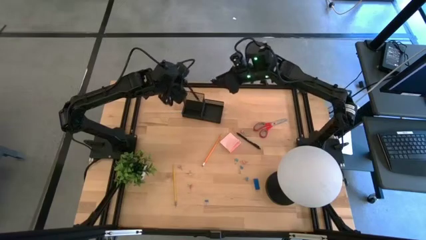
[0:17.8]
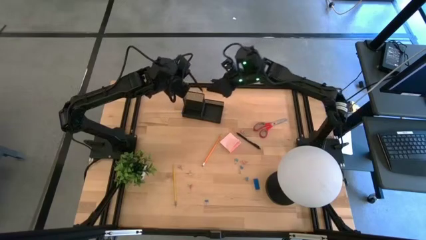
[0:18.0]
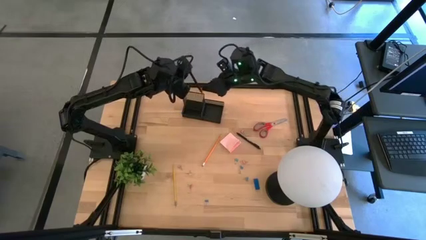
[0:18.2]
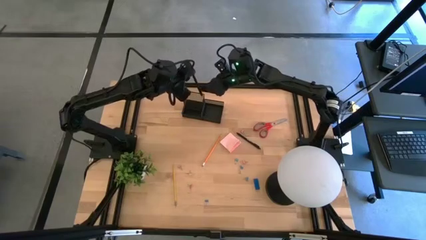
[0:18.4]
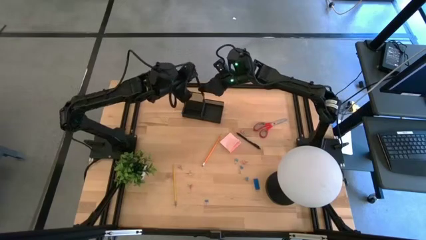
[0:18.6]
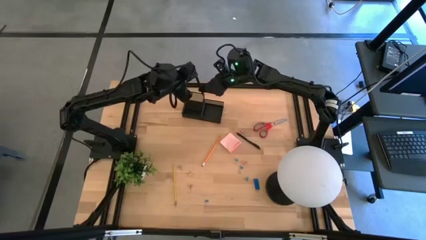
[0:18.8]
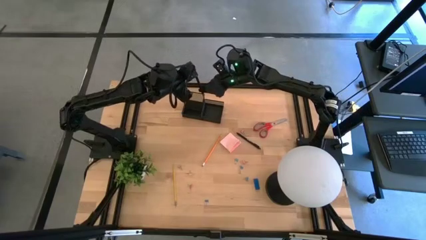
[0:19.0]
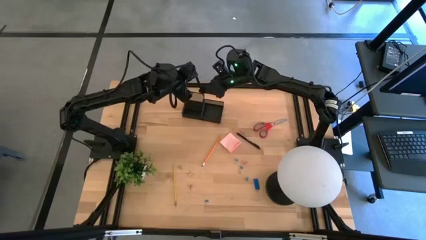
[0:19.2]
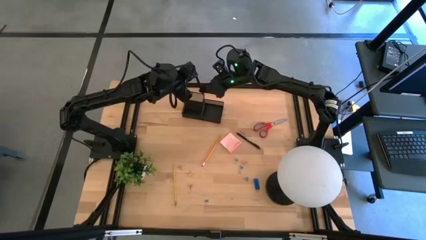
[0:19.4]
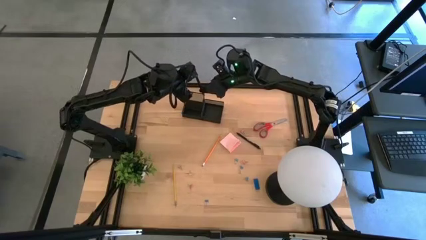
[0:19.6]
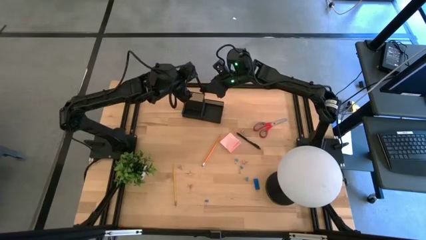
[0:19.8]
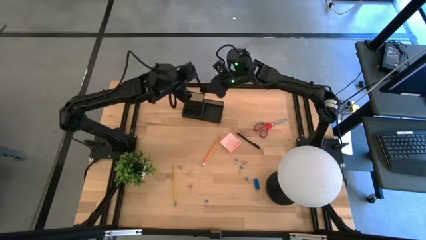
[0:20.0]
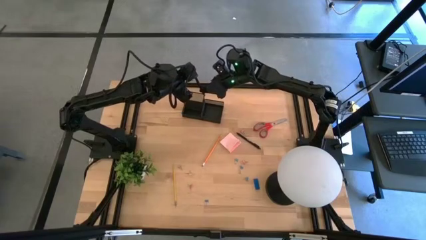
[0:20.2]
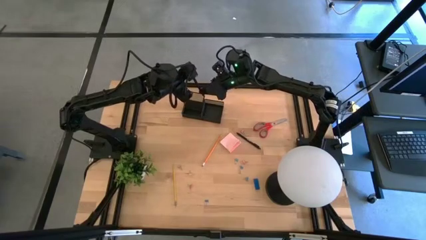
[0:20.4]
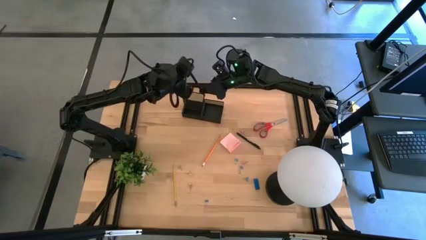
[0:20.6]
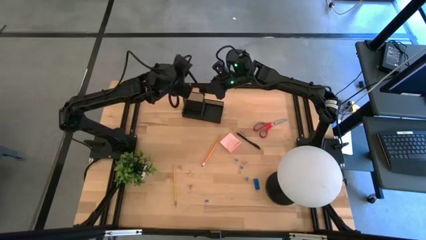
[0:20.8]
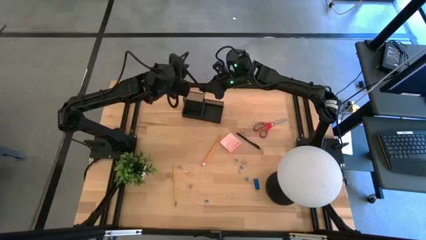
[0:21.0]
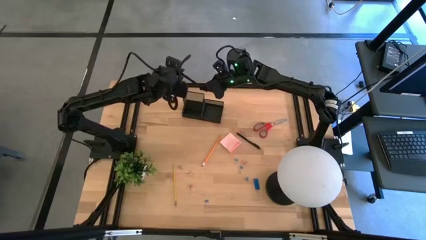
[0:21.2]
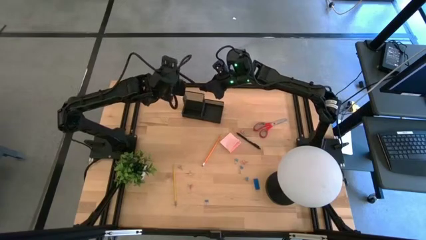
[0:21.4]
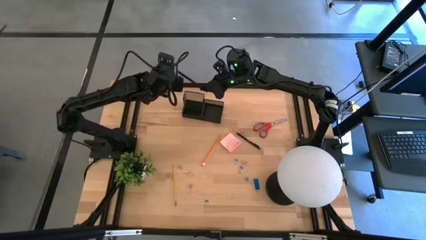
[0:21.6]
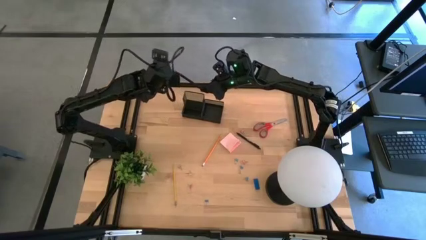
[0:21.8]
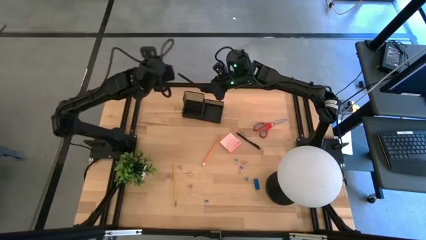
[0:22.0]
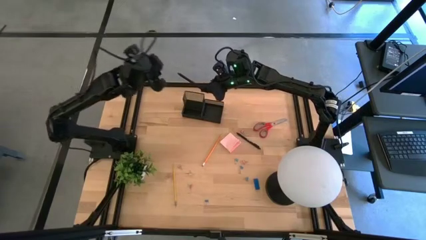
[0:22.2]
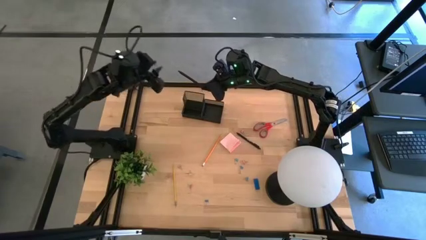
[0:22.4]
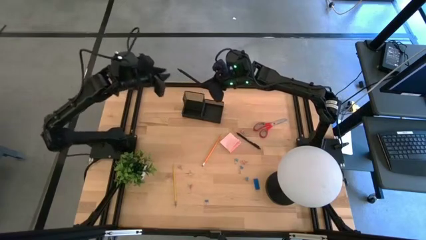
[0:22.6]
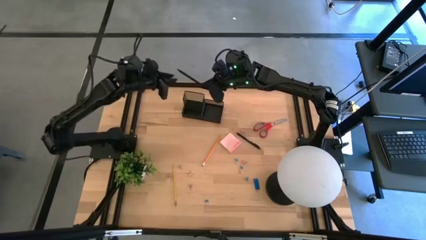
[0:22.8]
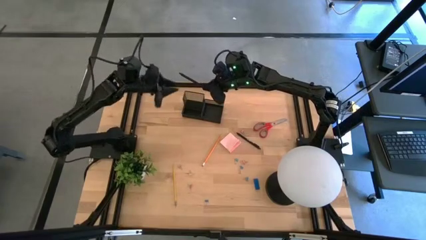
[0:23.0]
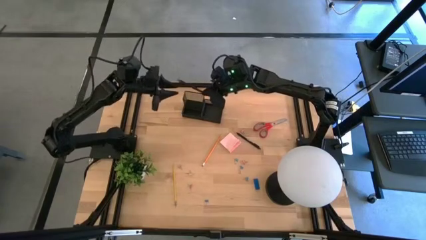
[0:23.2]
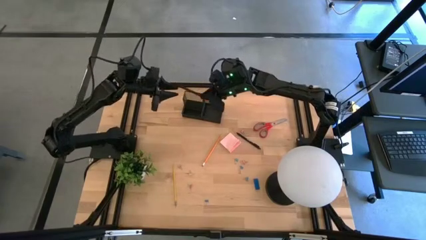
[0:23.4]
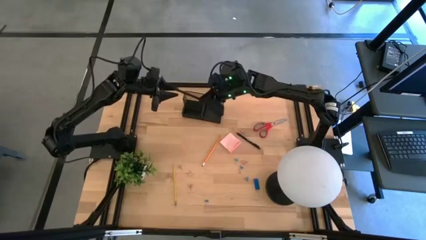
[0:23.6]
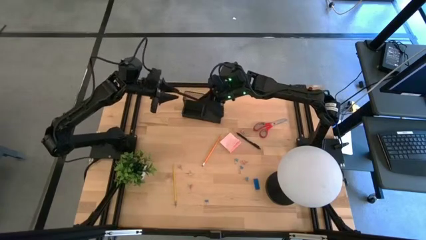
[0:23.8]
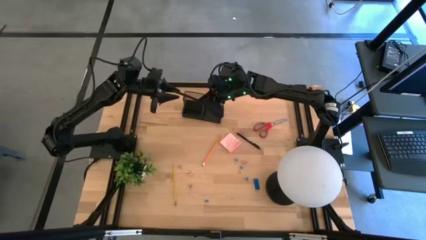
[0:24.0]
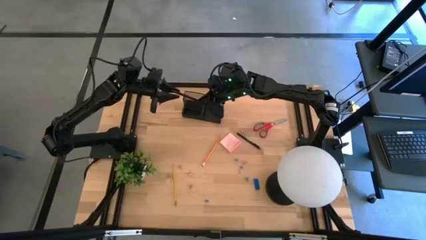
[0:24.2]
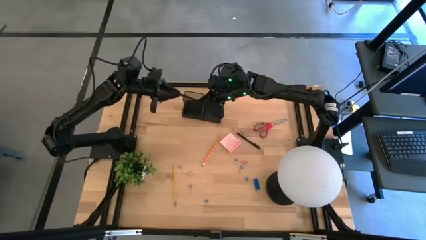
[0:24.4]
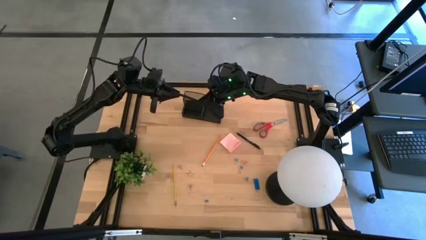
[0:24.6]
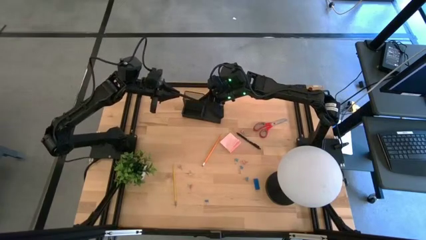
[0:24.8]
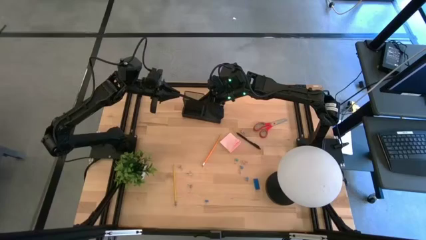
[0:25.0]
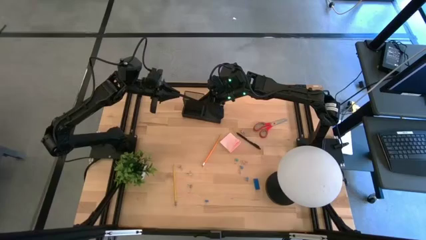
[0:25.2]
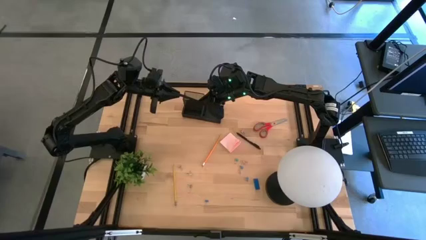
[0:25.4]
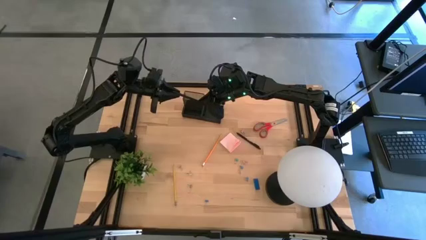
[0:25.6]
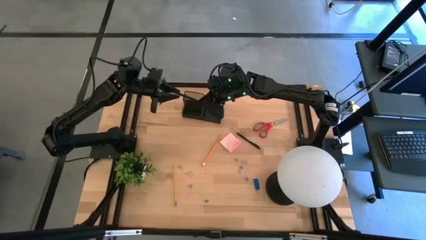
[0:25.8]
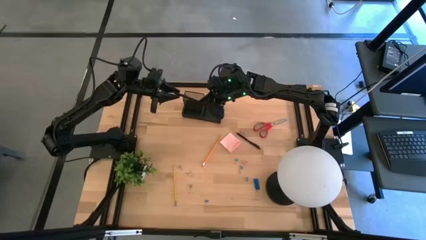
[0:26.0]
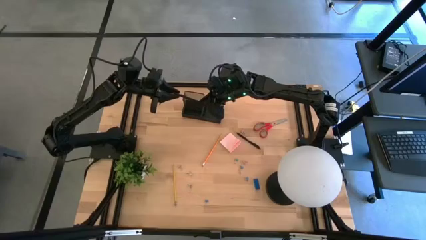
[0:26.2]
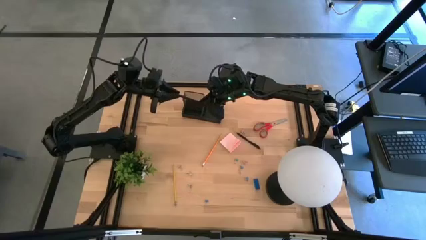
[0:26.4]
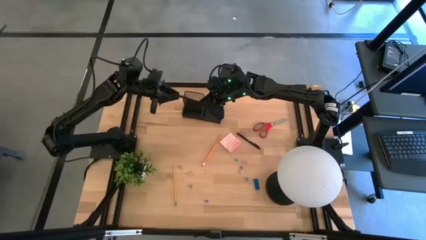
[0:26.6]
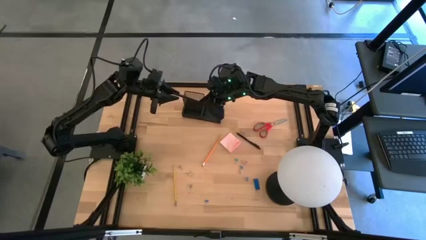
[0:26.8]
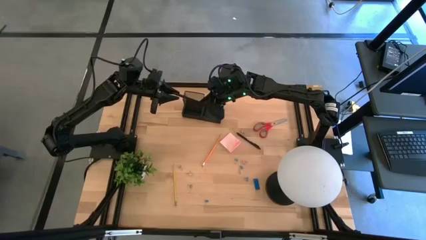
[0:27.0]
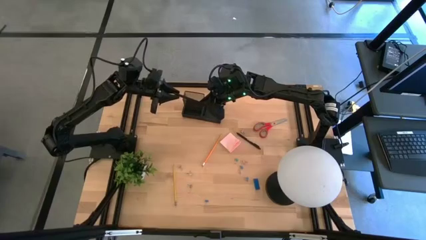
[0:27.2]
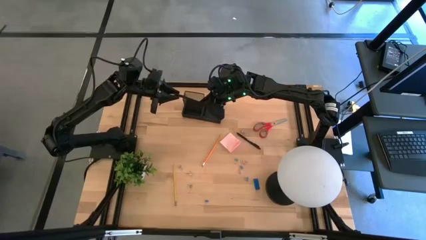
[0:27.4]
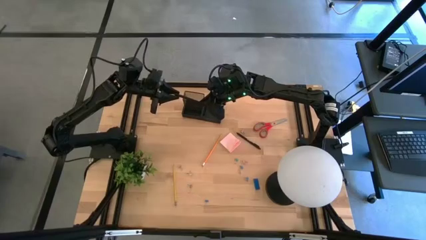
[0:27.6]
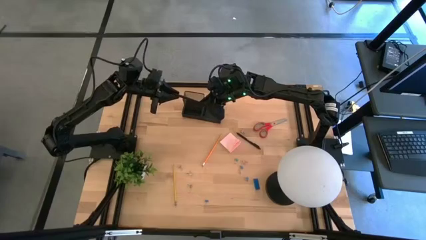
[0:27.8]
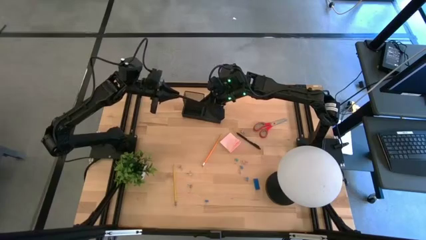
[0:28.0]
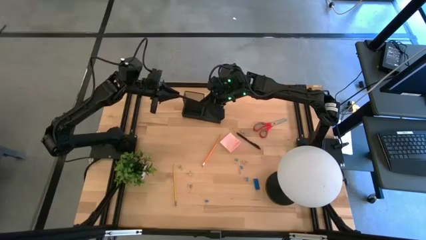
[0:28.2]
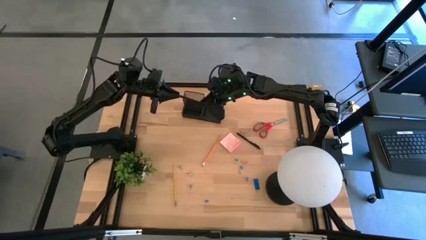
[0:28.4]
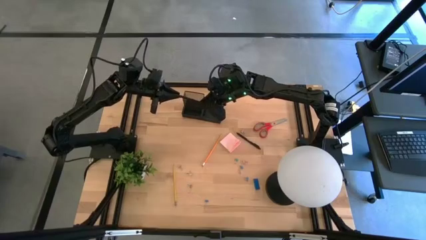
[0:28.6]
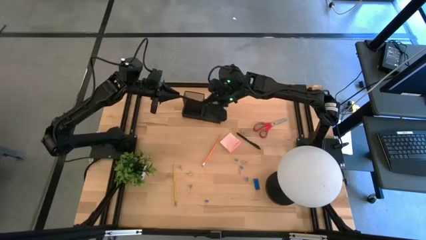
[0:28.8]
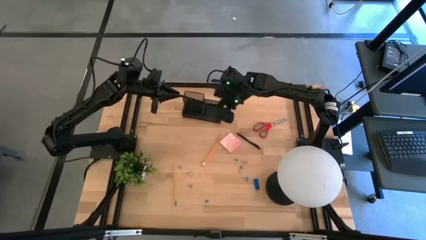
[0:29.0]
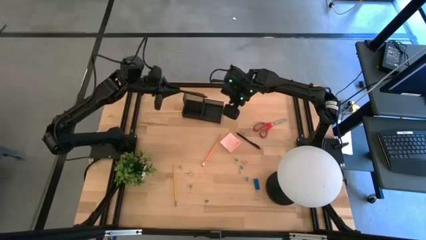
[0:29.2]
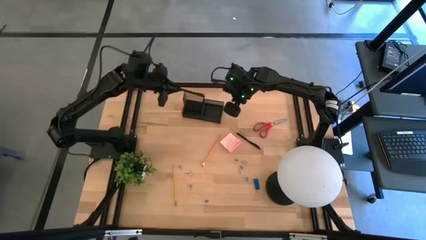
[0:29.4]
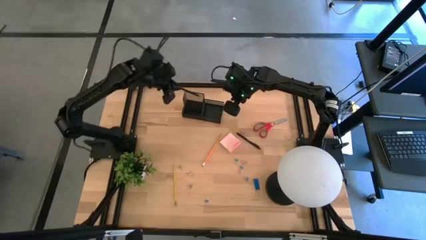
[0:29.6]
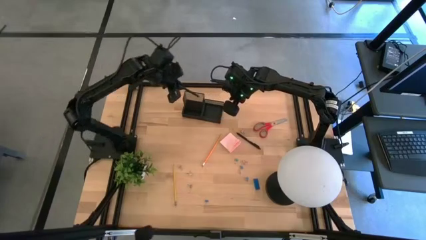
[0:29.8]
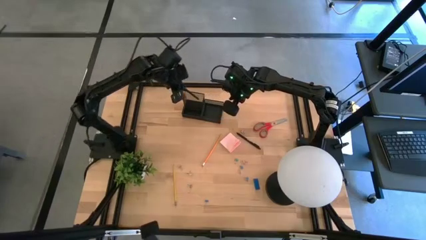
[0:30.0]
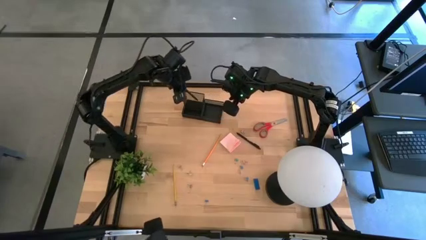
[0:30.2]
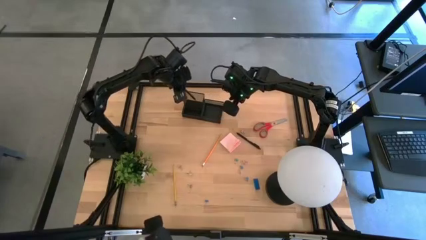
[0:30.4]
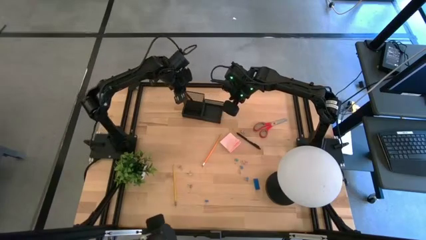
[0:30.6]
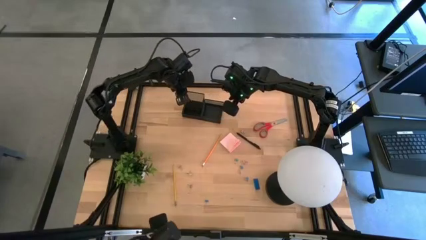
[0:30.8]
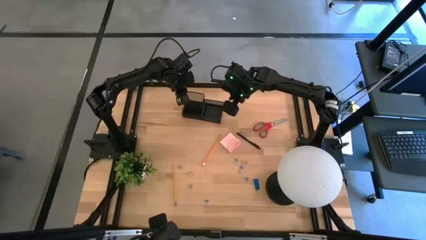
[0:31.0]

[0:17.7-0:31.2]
Task: Pick and place office supplies into organizer
Put the black pen into the black desk organizer

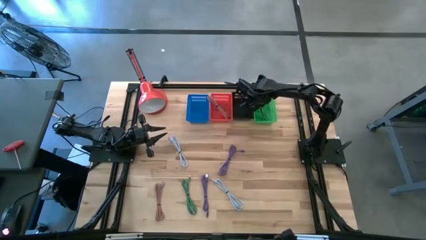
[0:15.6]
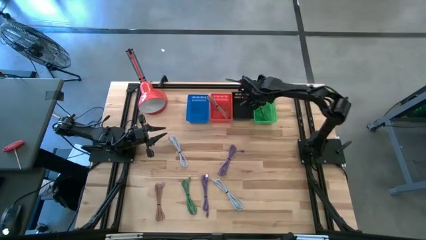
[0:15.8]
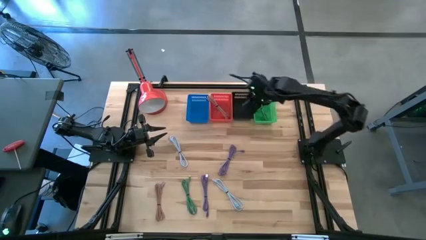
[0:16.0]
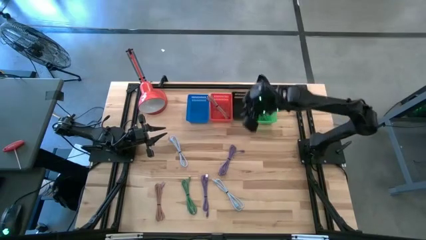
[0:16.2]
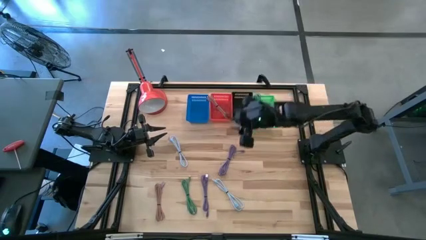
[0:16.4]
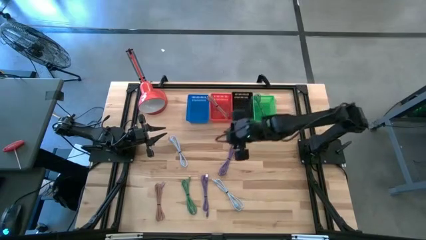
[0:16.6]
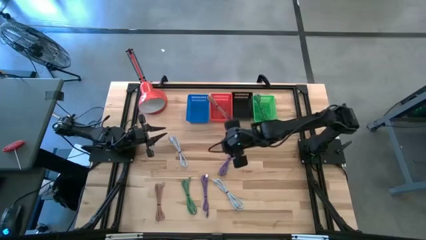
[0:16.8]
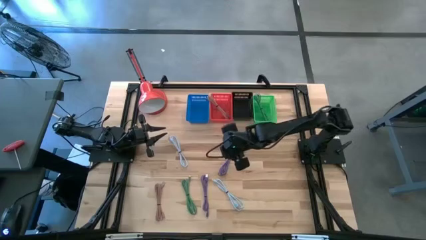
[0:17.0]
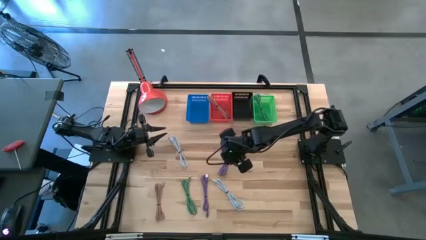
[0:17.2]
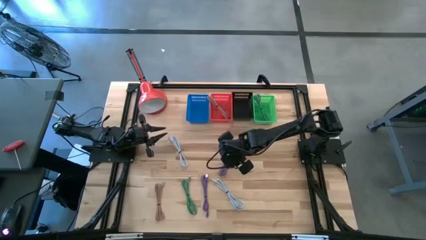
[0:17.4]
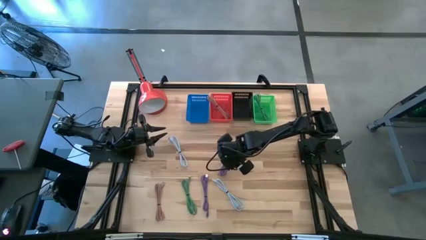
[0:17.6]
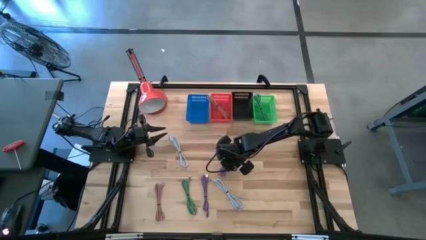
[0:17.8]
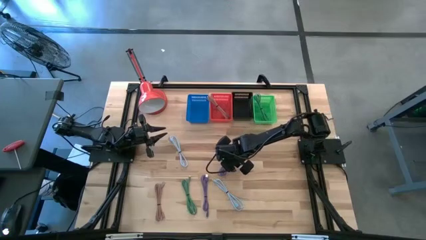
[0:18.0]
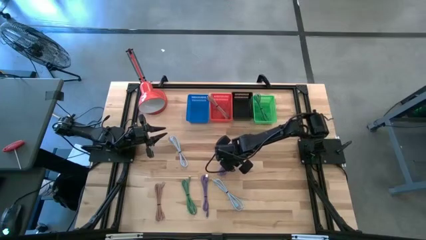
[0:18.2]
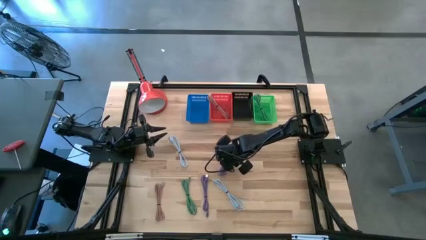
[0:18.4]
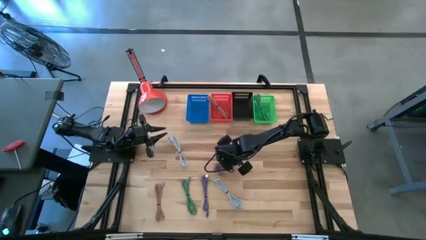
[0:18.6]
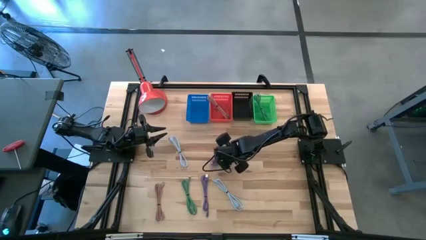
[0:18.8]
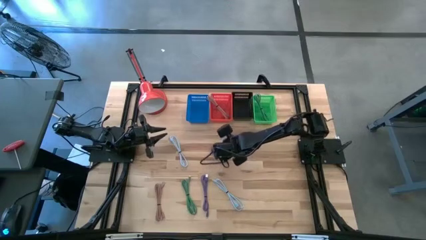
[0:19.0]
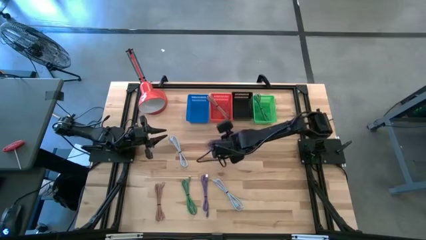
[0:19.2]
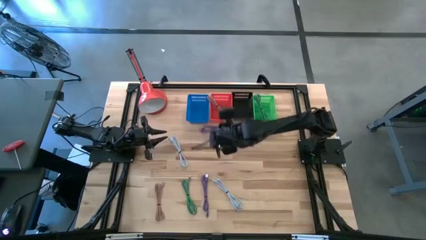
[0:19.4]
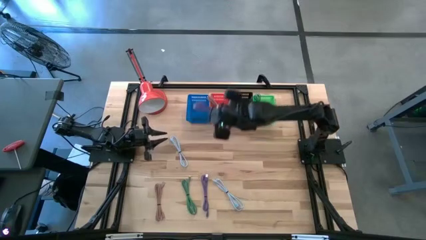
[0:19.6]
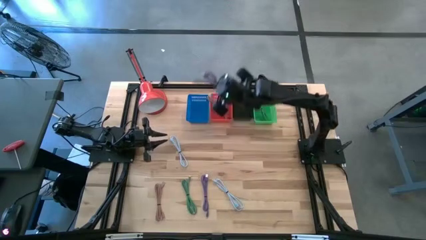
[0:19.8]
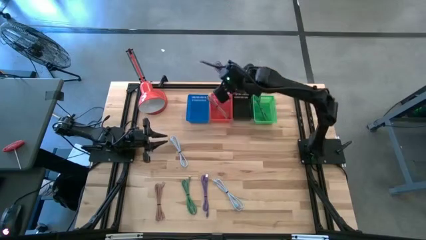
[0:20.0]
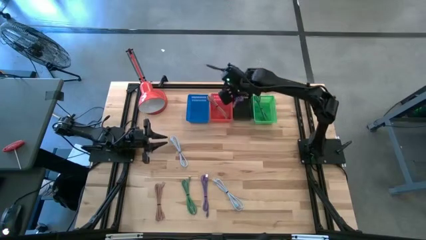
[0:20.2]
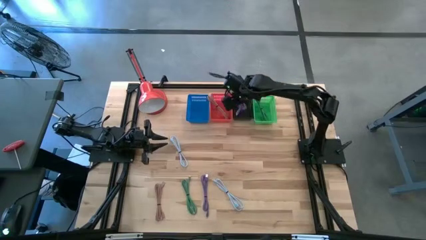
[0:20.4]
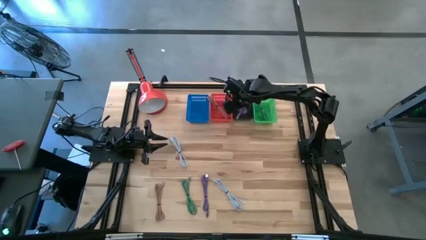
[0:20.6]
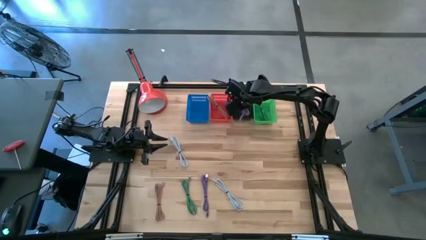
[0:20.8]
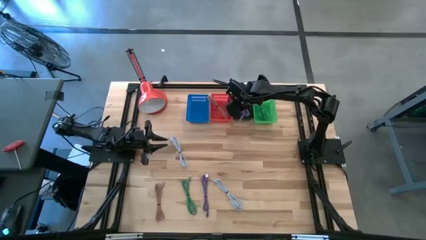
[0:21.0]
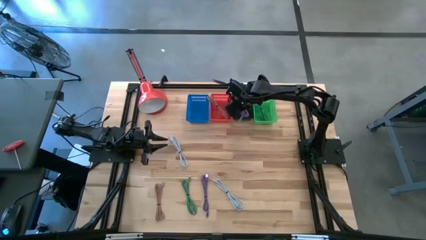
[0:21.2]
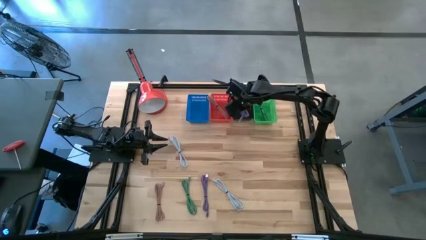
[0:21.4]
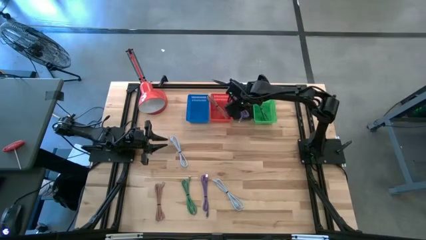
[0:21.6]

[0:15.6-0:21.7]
Task: Pick & Place USB Port
Put the top purple charger cable into the black bin
